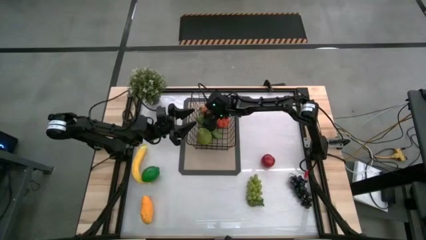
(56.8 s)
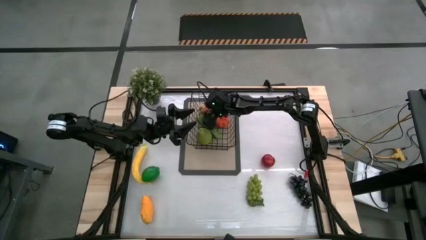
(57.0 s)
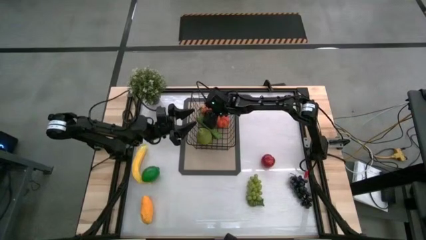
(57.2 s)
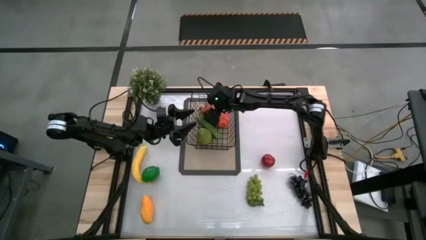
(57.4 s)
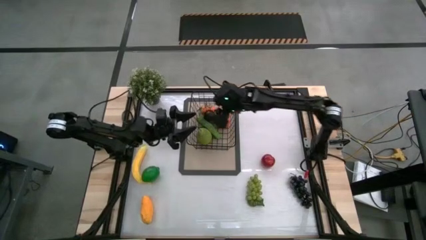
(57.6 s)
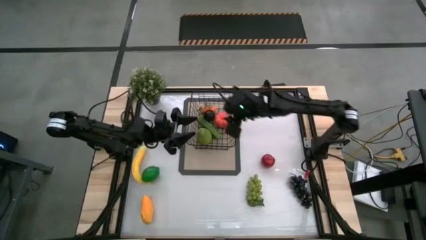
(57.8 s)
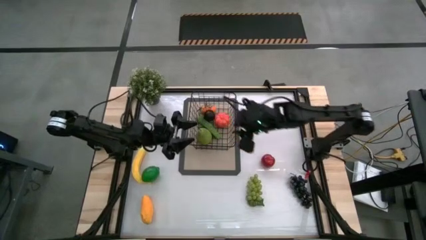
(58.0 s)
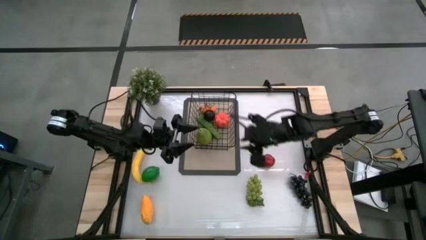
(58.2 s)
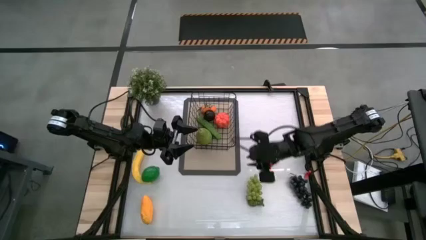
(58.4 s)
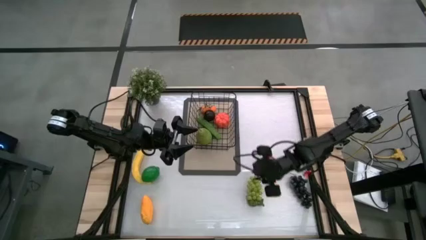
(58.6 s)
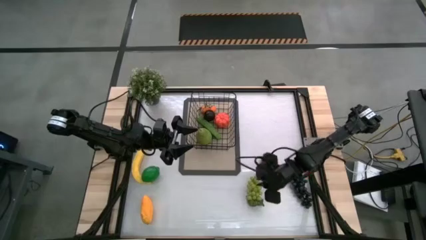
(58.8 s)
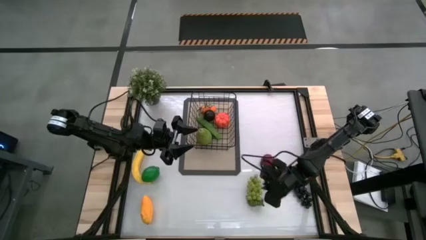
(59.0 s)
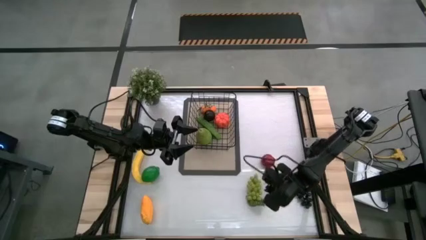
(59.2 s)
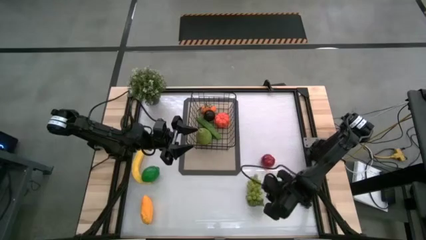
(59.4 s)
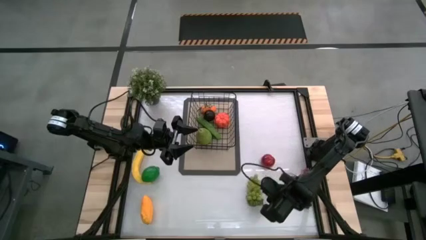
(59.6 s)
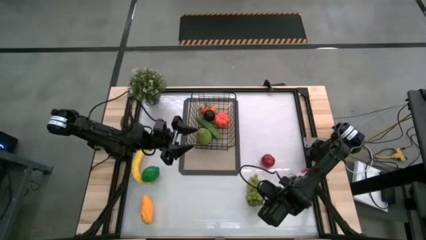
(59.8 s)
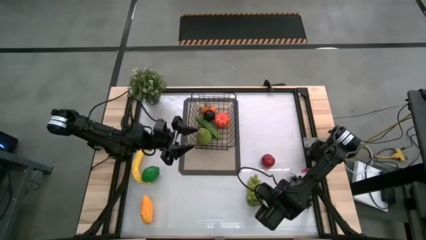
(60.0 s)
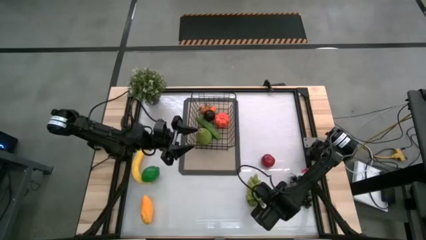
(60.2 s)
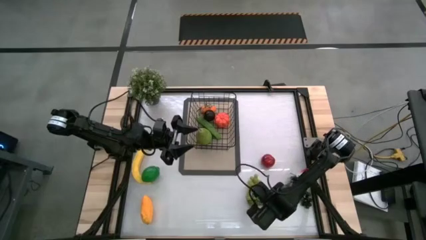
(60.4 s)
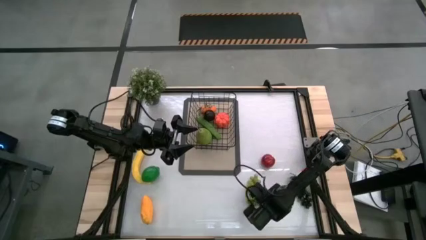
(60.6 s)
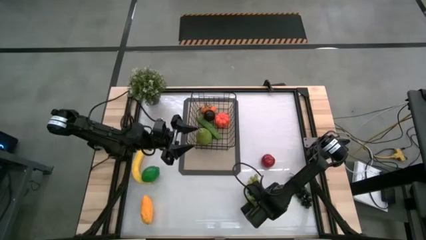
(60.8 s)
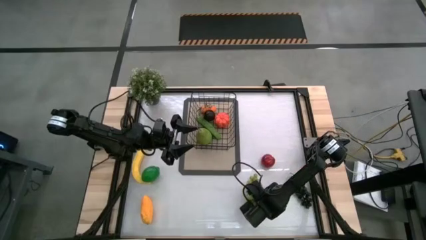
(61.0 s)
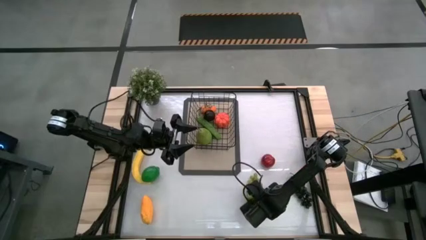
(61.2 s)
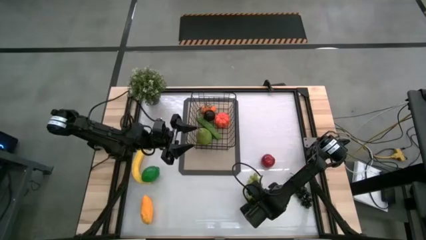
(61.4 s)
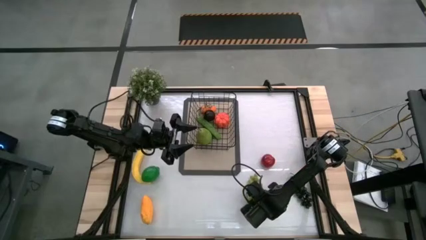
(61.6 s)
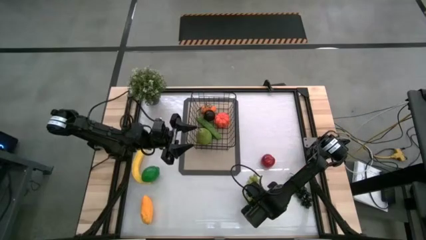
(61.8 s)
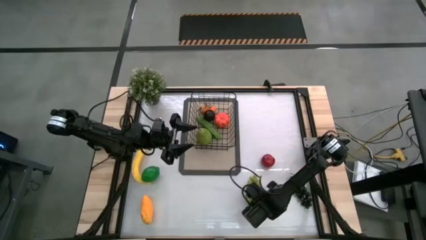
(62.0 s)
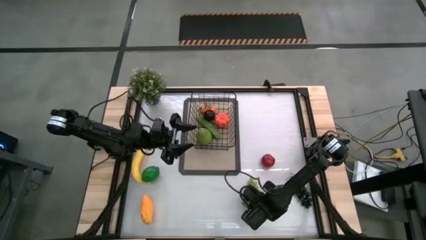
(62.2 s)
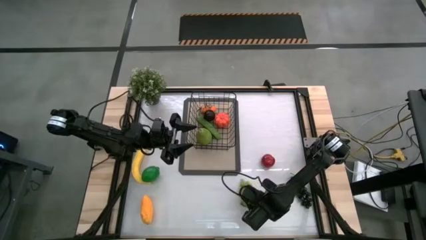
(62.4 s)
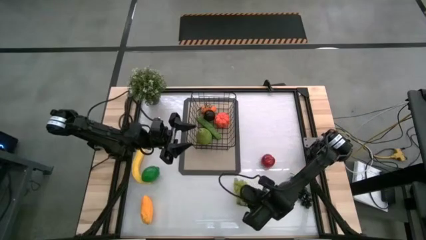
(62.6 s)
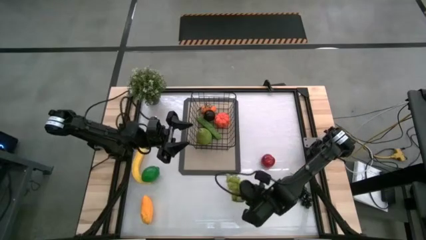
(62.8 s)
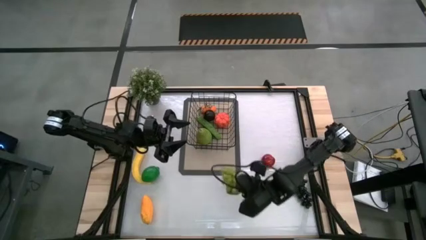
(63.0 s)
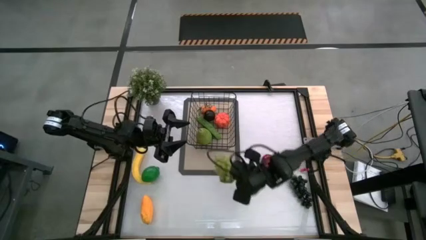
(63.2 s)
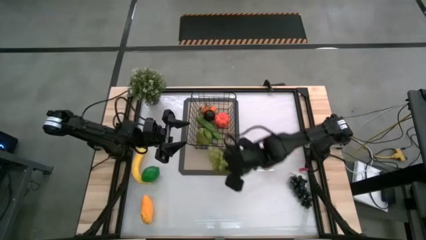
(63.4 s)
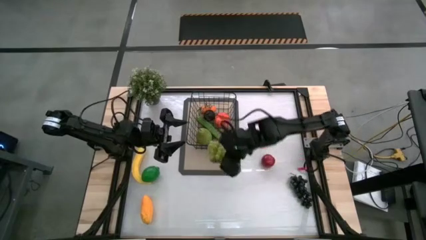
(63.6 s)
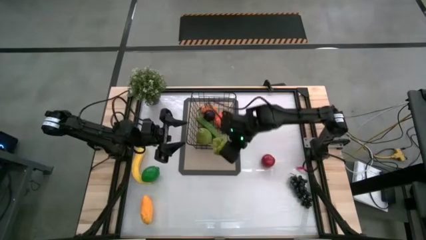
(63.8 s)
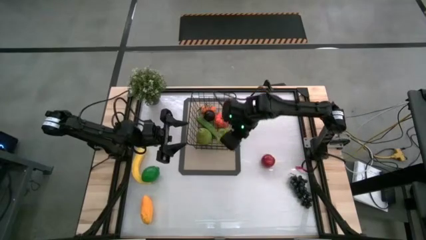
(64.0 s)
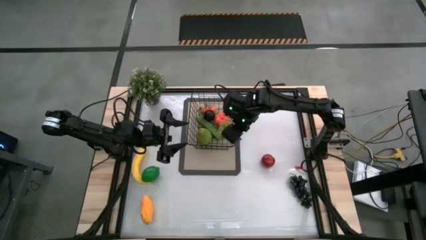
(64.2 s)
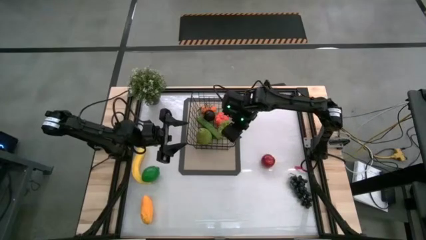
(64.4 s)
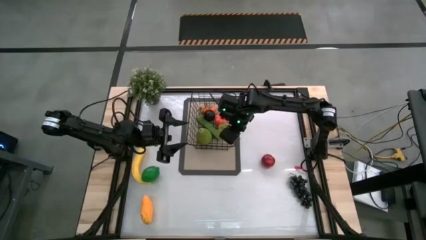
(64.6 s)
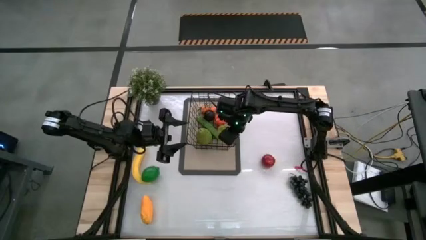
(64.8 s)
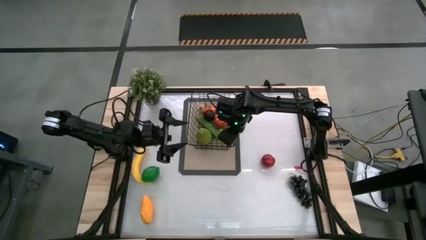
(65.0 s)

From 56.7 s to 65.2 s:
Task: Build produce basket
Put the green grapes into the black wire basket

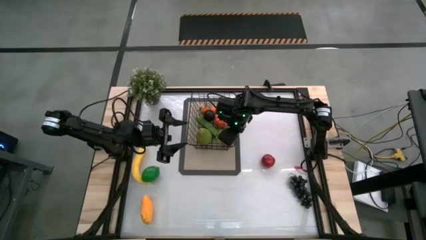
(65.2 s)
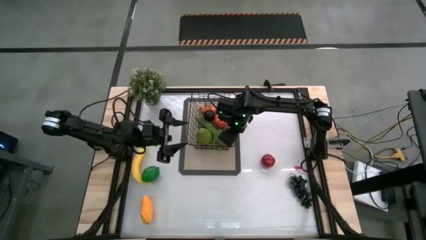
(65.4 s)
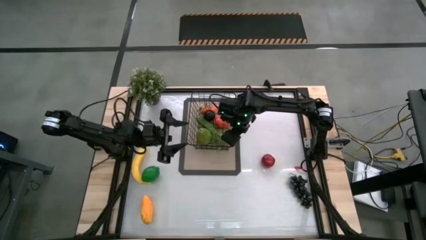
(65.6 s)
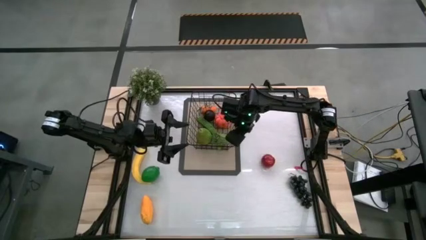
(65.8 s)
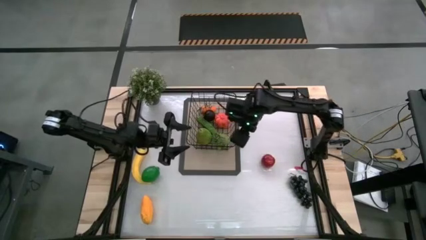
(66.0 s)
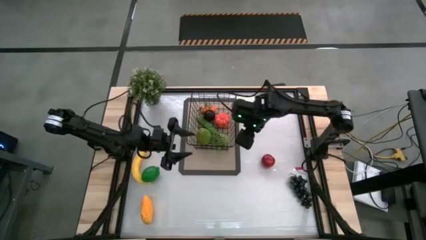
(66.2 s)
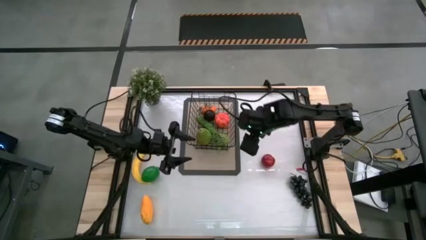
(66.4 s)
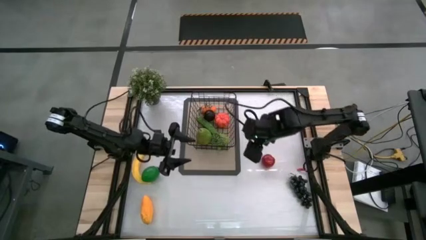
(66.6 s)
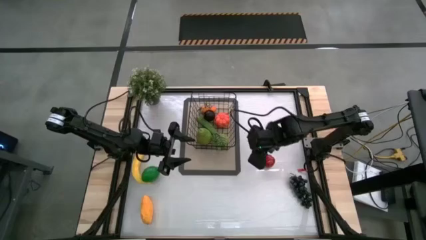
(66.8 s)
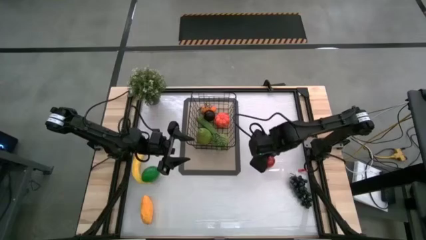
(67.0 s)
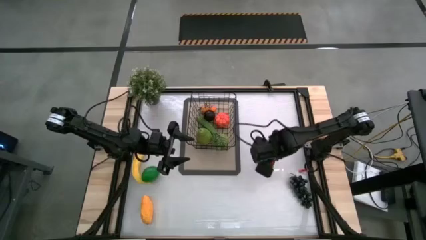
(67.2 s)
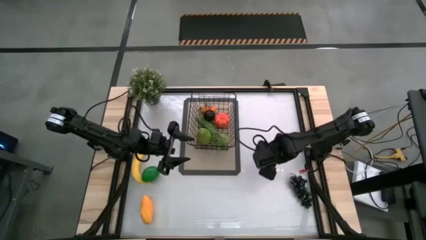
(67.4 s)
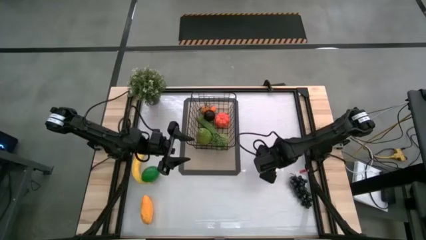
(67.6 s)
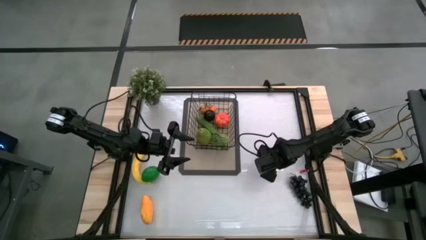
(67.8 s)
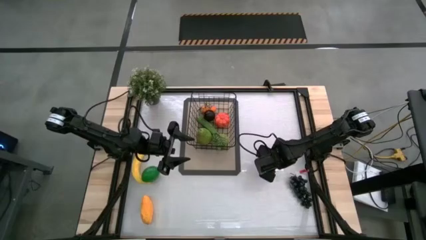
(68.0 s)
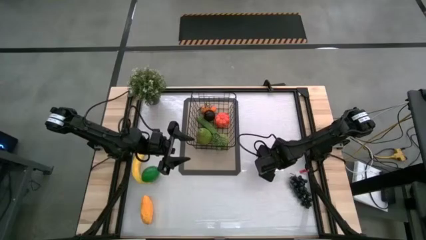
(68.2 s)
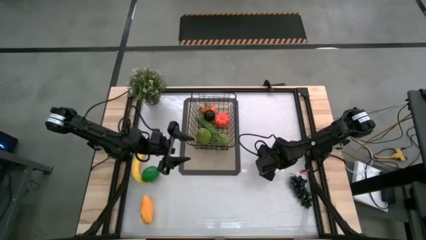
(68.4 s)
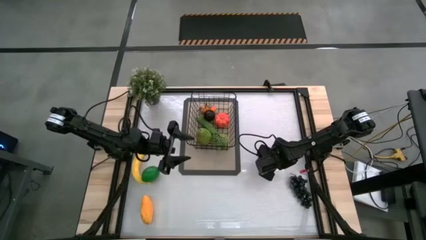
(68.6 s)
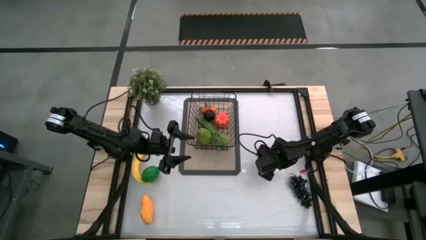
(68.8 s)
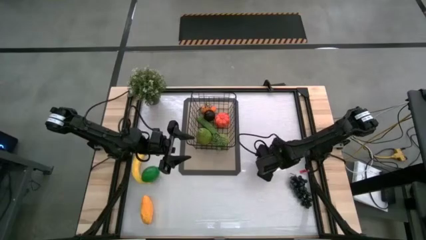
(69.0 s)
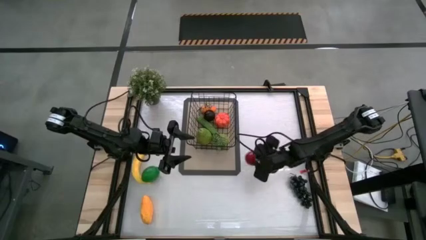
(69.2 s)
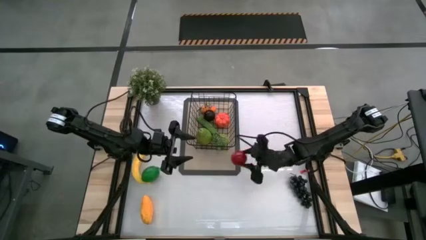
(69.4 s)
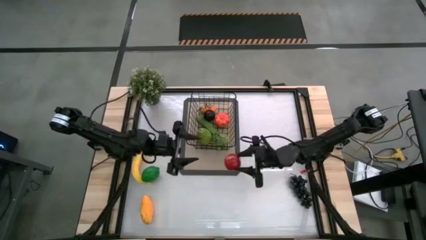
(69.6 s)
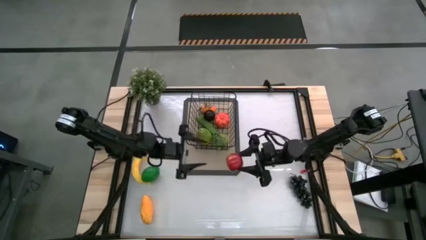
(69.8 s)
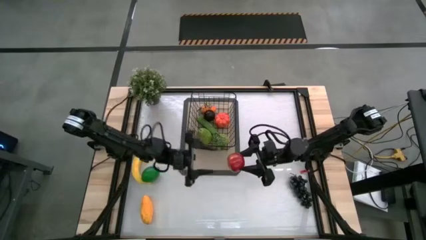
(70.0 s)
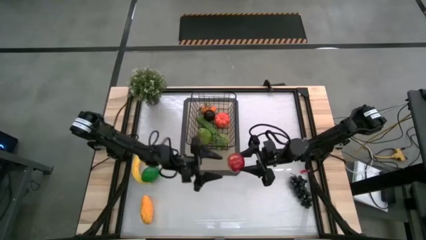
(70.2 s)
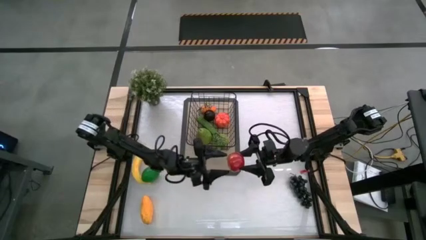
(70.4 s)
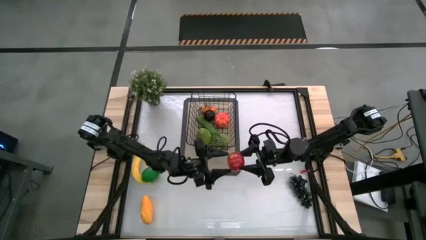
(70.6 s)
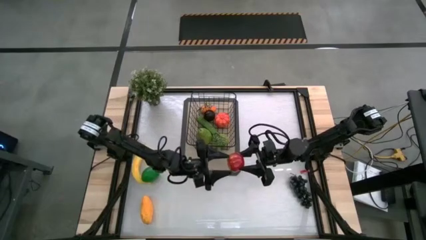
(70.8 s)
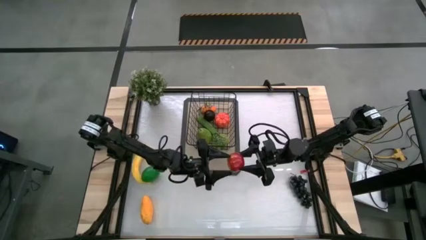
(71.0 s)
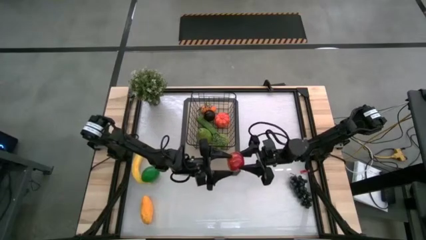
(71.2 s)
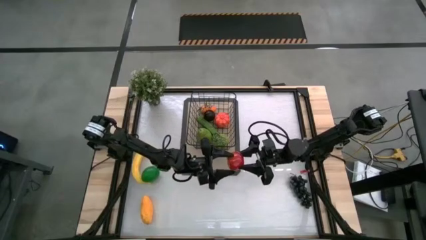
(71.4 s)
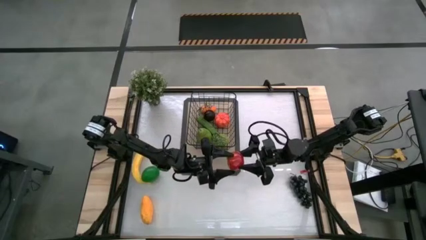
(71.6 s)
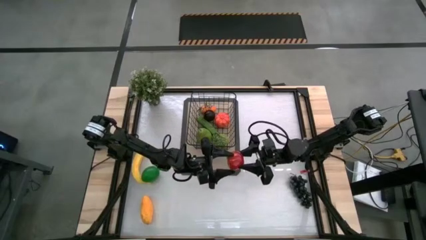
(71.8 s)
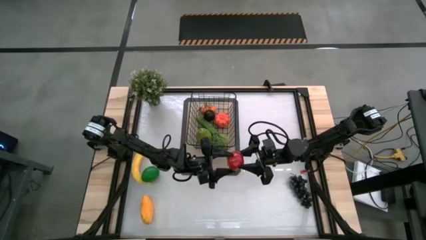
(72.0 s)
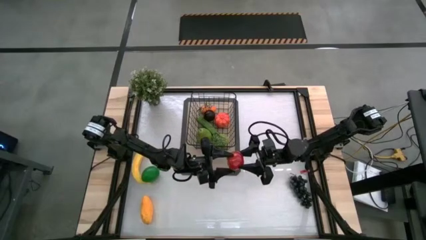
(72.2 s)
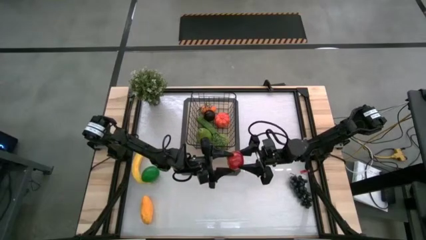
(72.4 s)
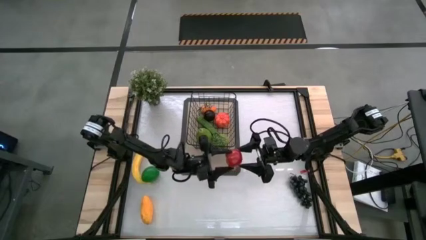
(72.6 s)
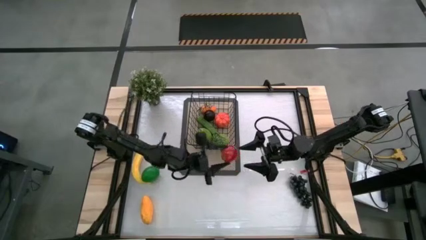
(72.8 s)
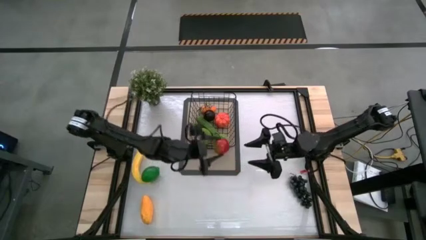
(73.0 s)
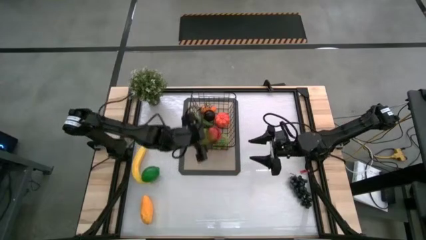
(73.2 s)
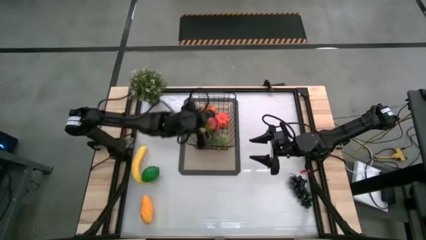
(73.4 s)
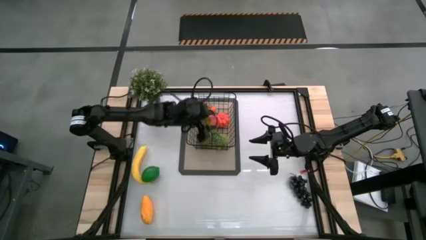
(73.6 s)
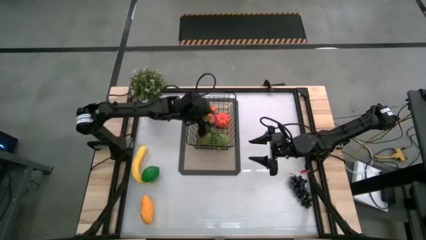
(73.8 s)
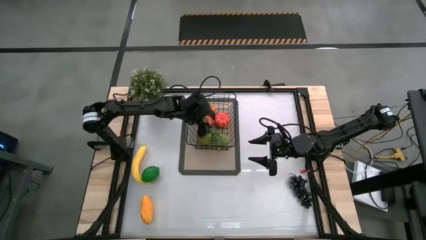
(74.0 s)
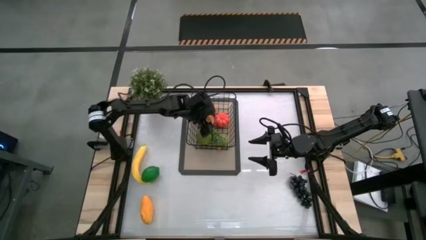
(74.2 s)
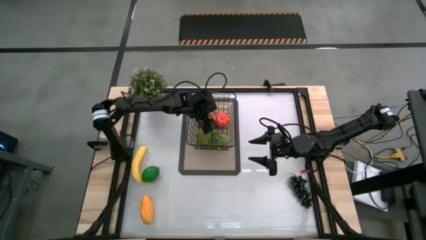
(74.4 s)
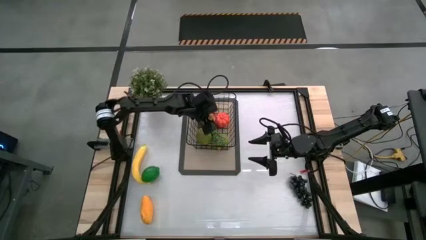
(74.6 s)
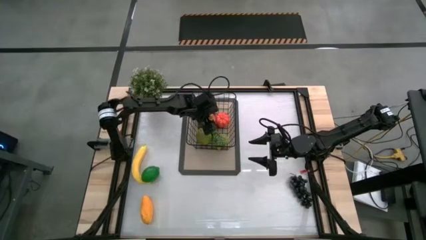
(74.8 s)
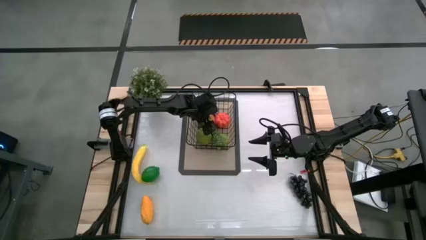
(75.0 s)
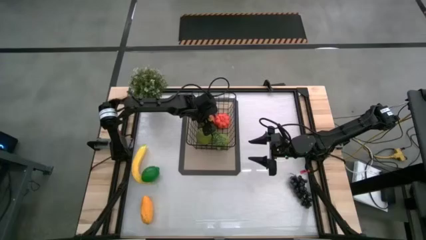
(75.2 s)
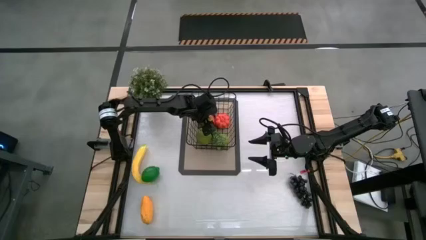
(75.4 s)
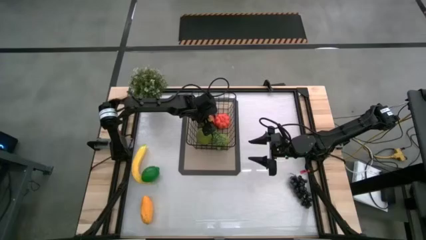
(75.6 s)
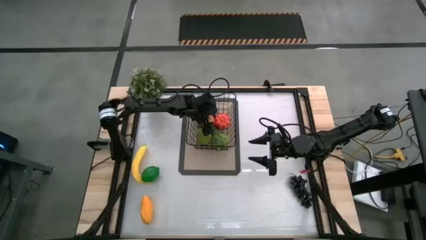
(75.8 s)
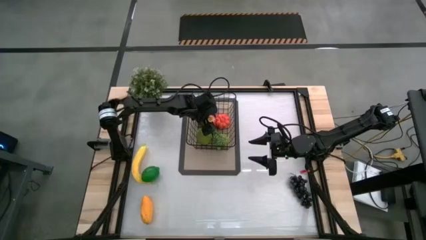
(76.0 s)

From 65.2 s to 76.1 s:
Put the apple into the black wire basket
